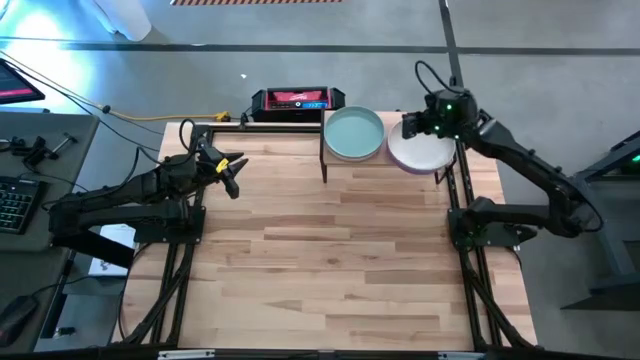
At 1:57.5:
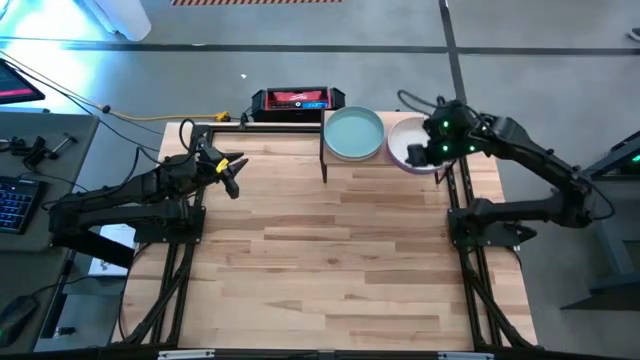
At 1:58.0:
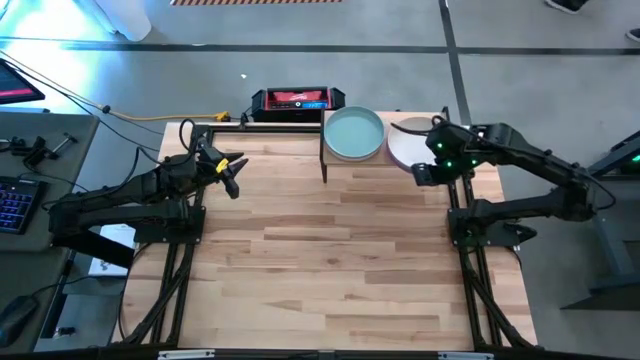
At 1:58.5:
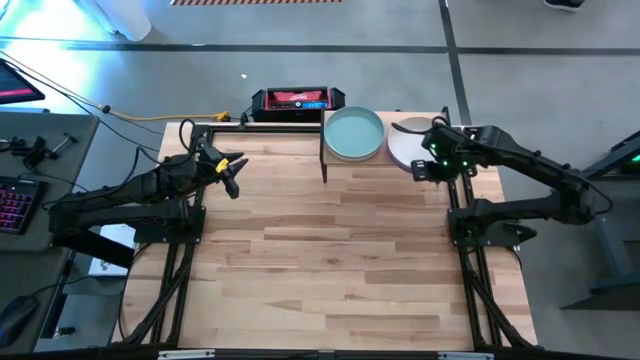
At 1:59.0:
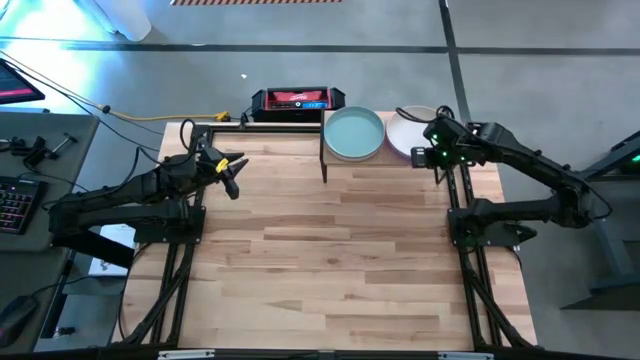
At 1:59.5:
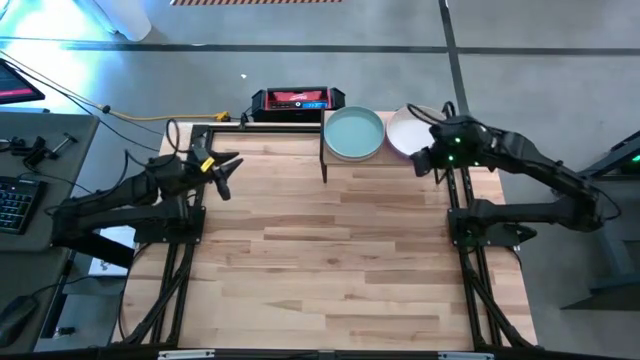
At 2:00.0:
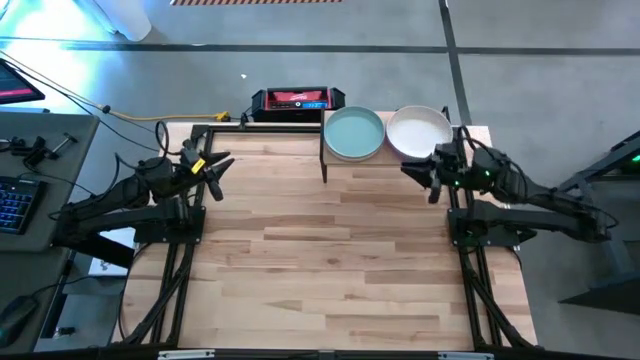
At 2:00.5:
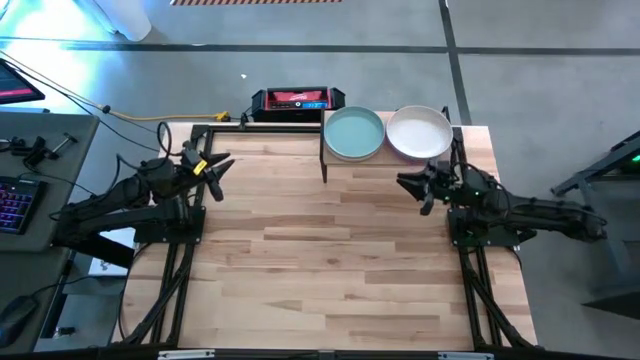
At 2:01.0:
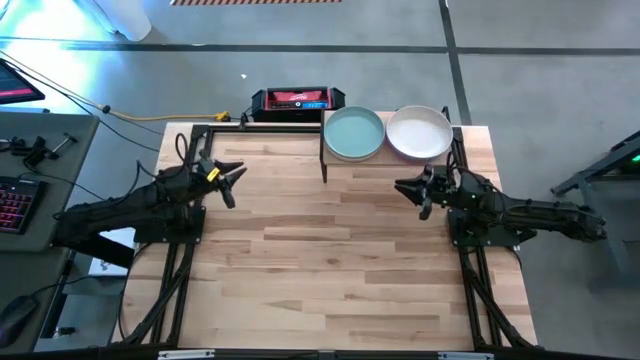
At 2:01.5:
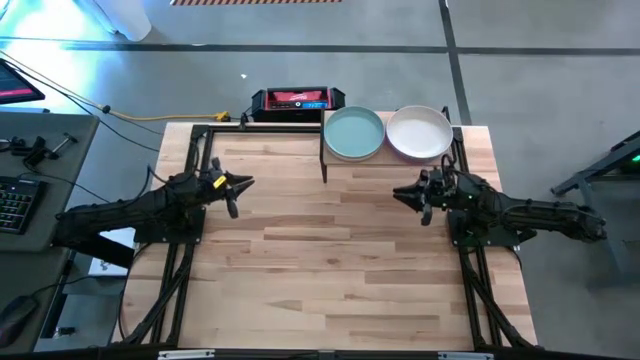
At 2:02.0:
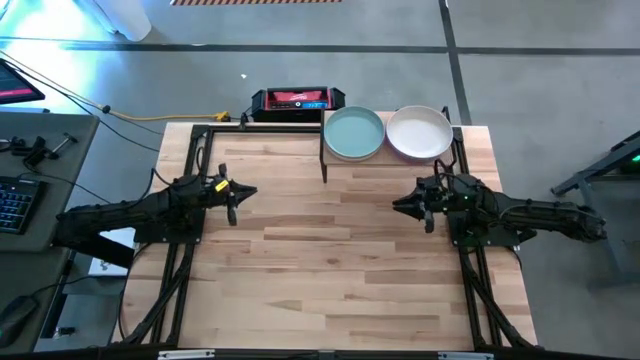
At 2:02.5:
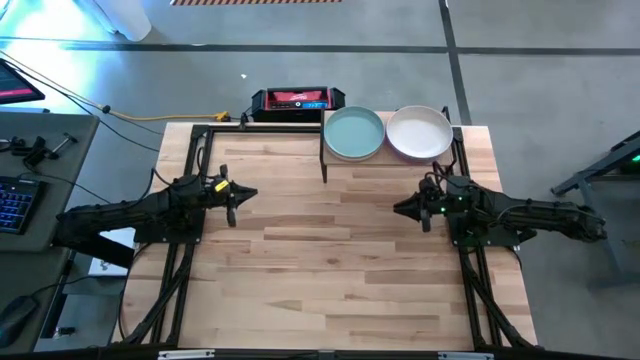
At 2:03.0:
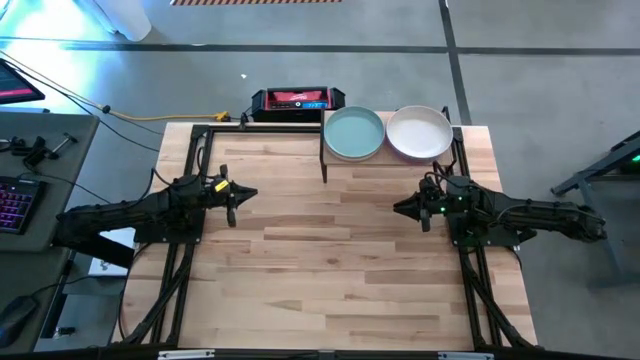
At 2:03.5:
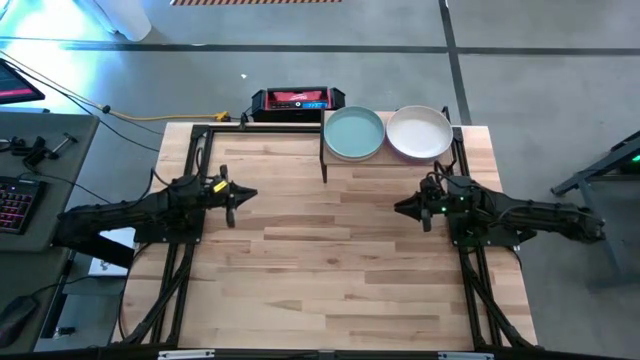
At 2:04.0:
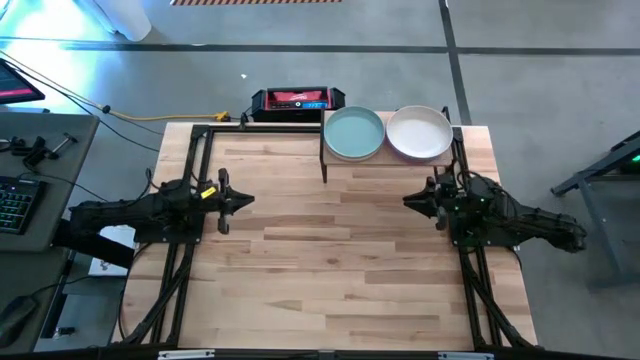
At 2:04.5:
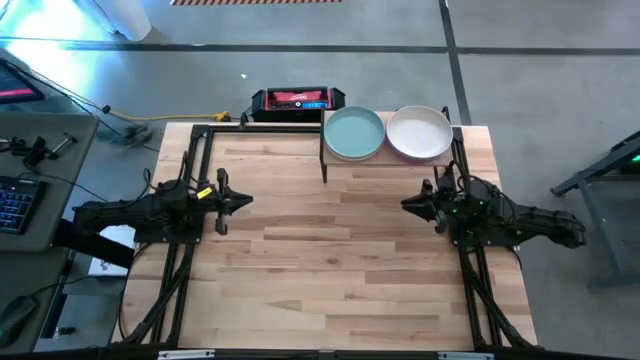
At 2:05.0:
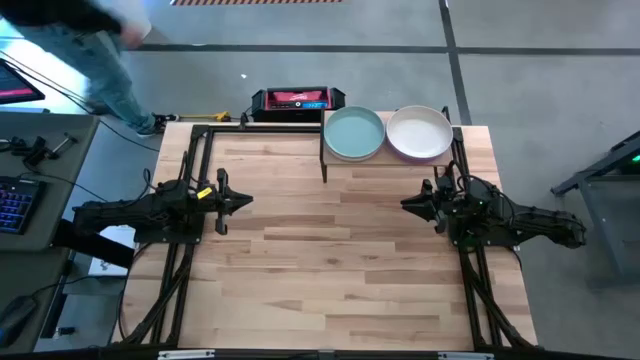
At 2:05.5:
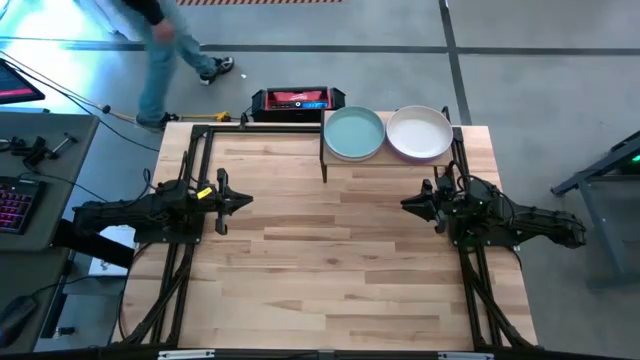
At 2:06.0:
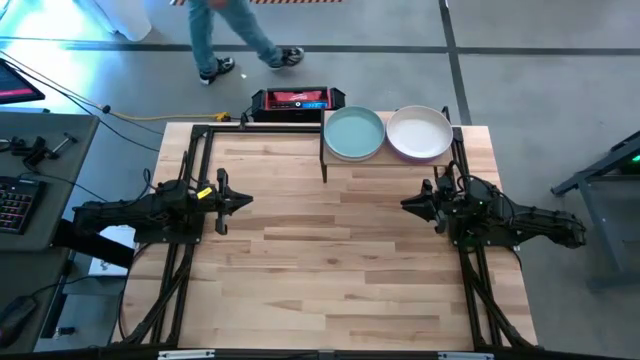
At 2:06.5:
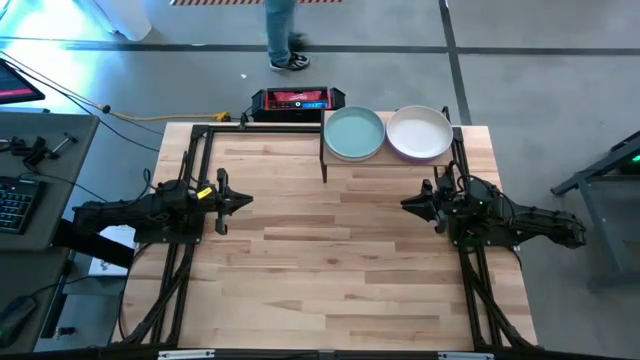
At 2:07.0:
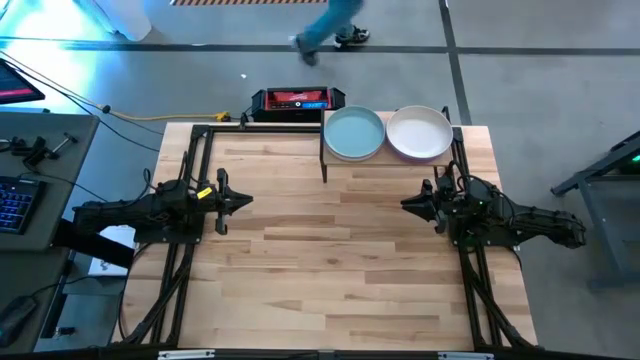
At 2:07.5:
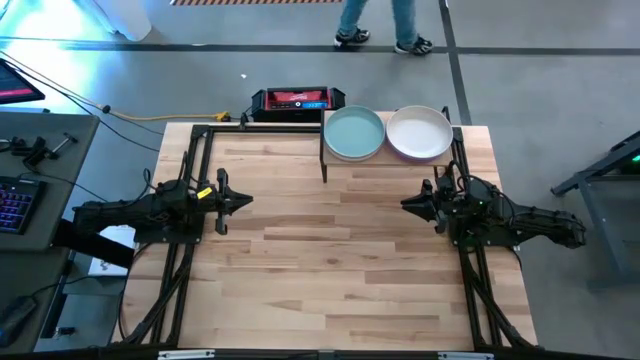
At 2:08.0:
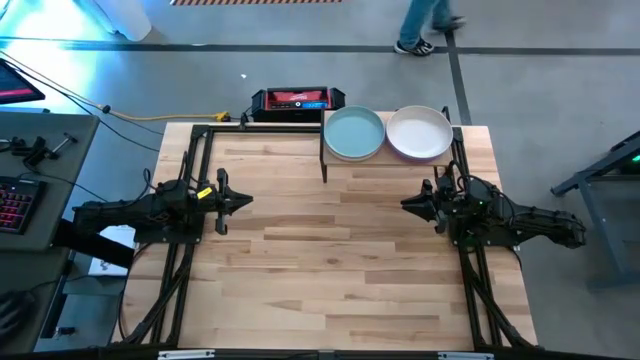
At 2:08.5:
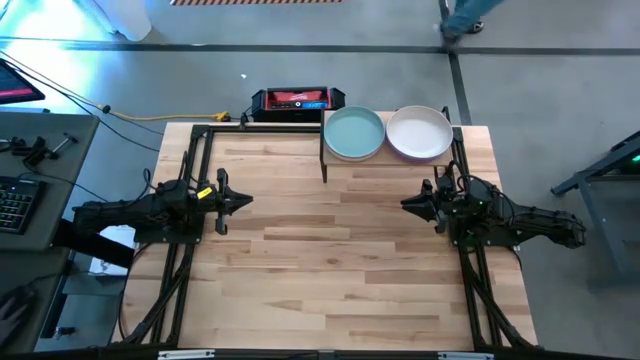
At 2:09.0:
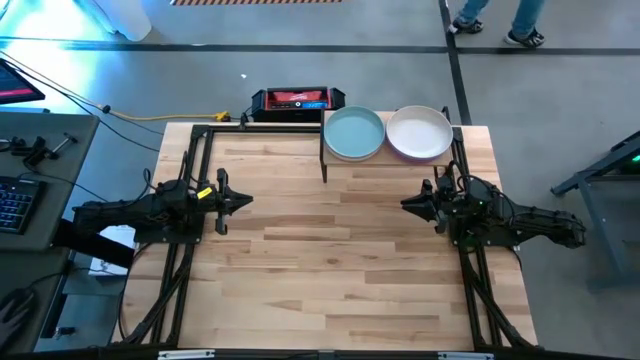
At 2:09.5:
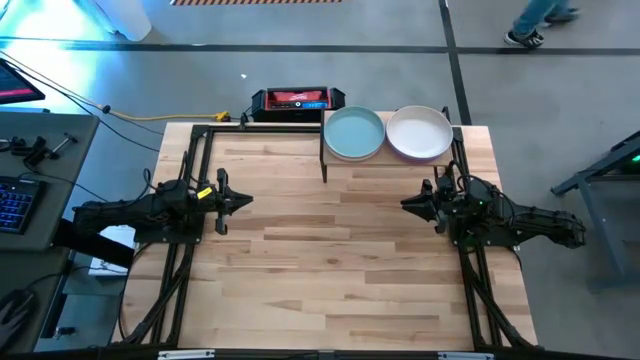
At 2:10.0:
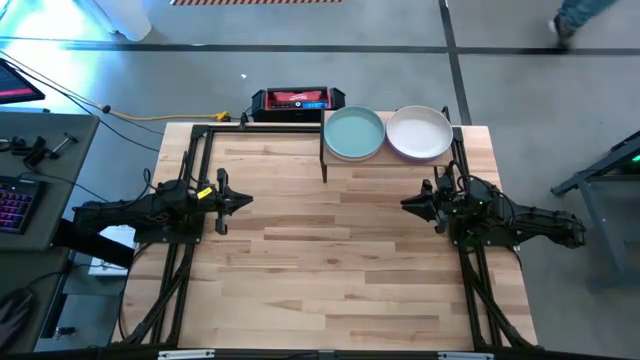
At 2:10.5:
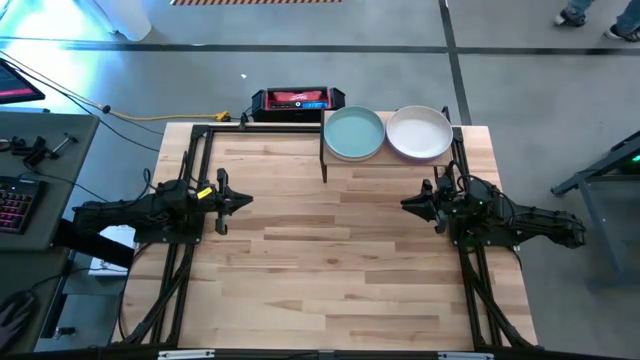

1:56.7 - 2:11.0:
Task: Place and stack plates onto a shelf
Return to Home Position

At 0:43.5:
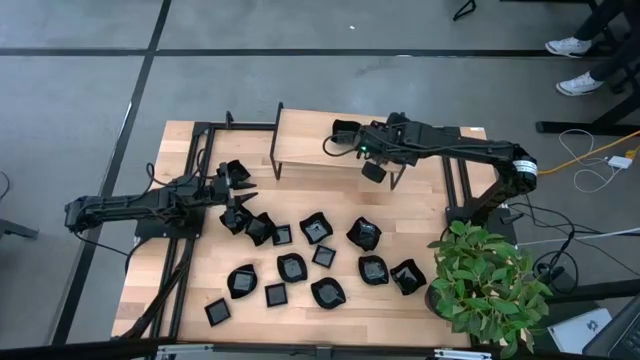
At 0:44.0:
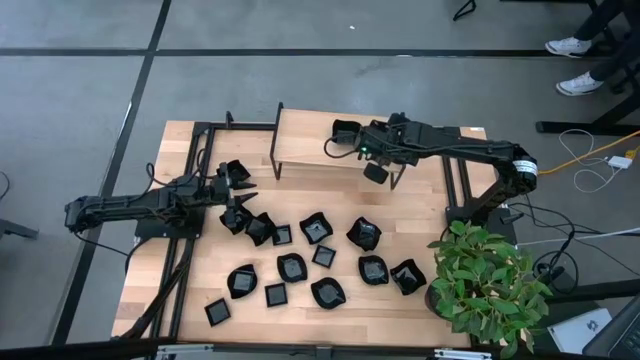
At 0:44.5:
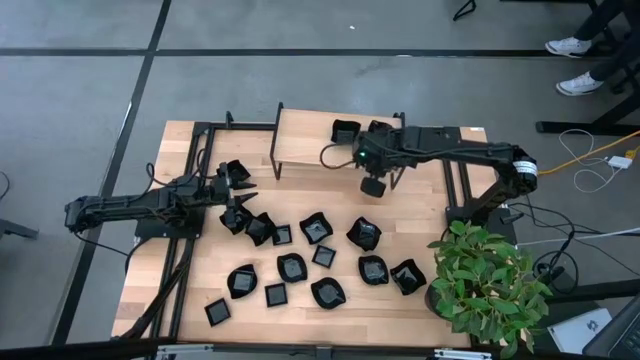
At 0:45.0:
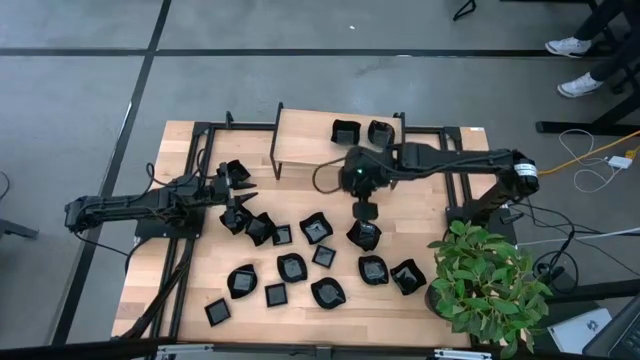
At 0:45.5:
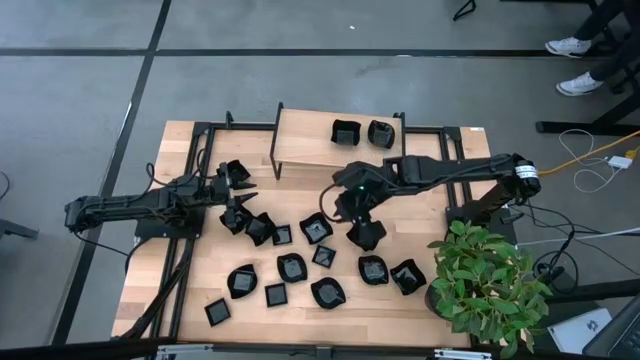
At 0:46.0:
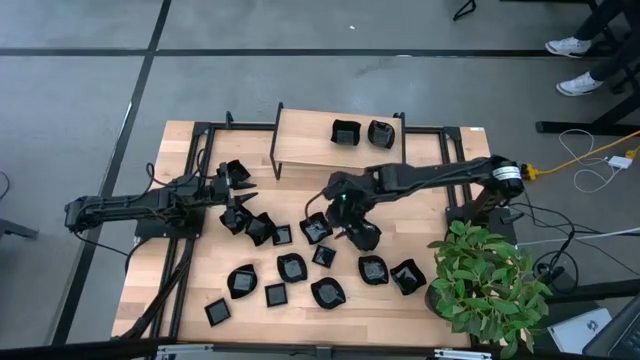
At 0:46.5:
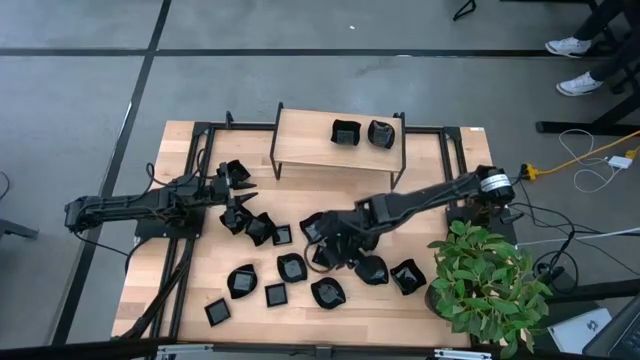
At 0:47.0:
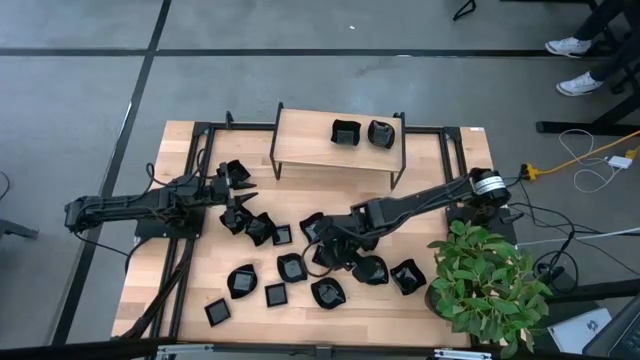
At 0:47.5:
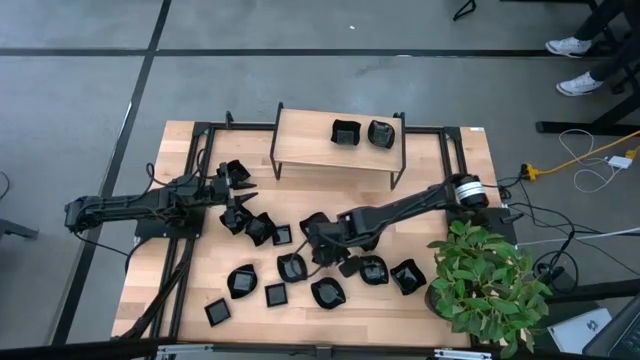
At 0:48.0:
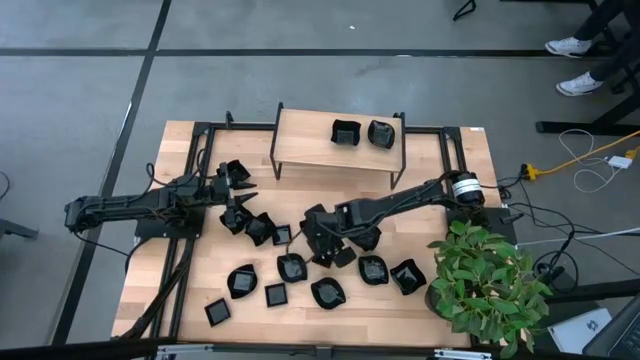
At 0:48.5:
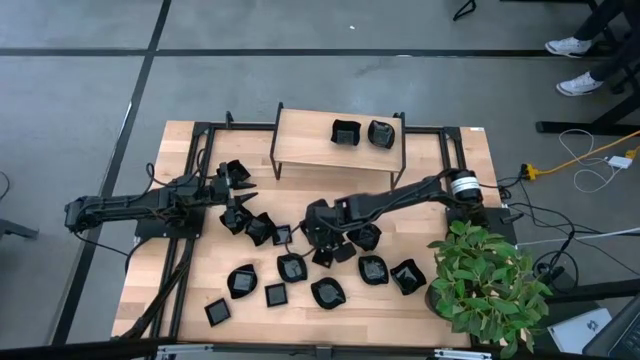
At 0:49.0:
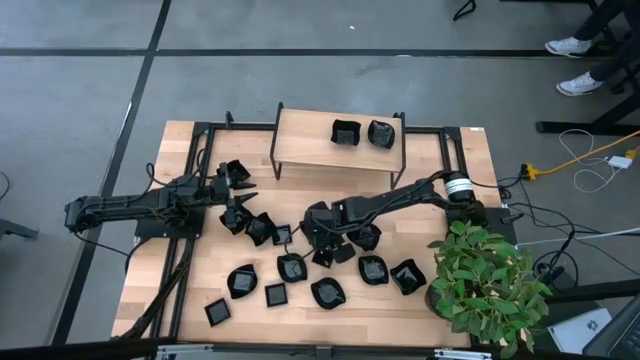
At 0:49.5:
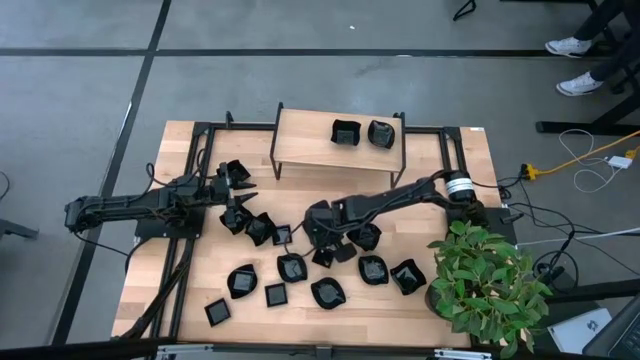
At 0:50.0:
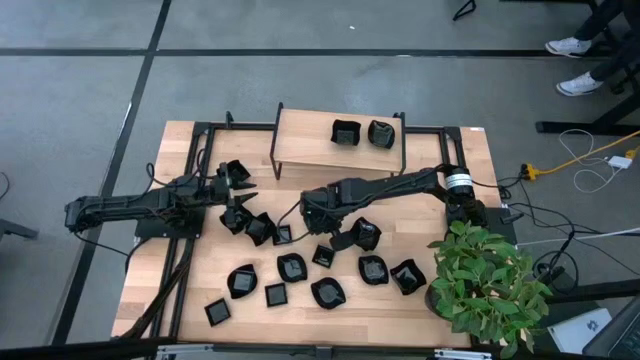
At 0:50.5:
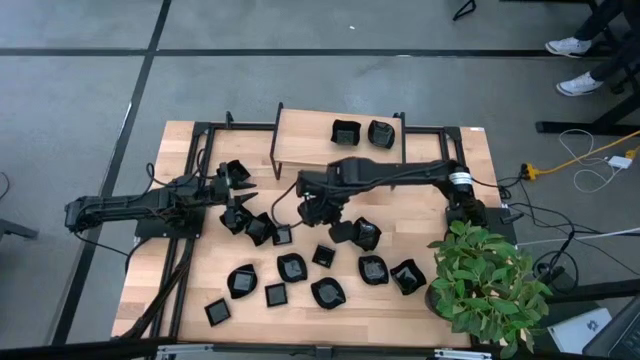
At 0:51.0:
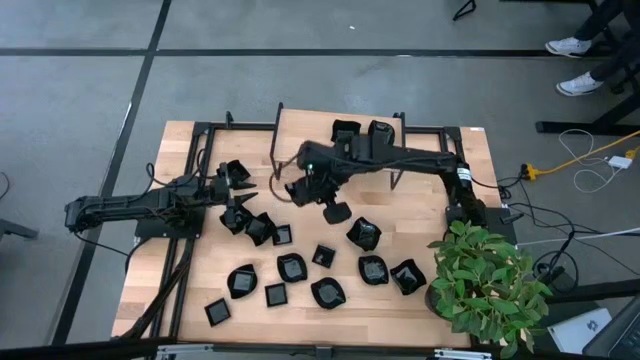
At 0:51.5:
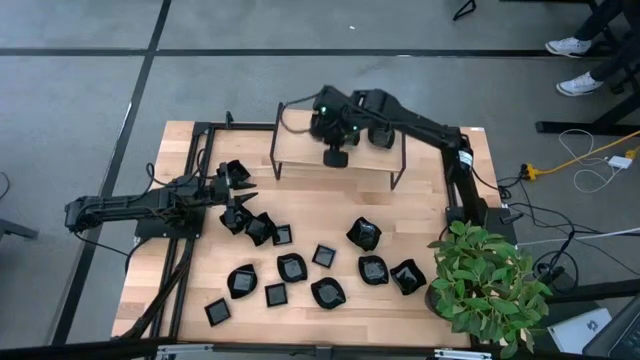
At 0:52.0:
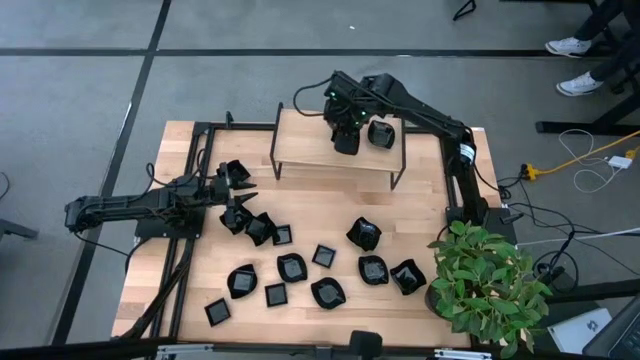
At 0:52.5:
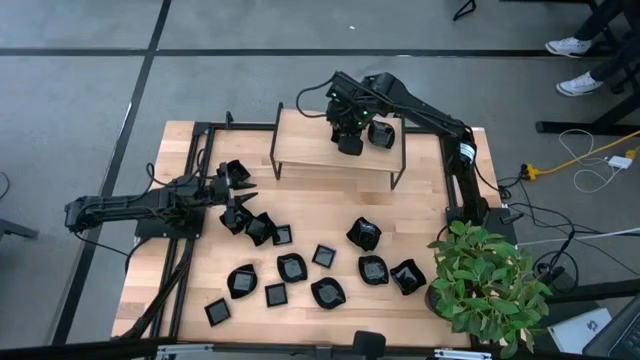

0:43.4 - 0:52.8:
Task: Pick & Place Mini shaped plates
Stack the distorted square plate on top of the distorted square plate on the shelf
